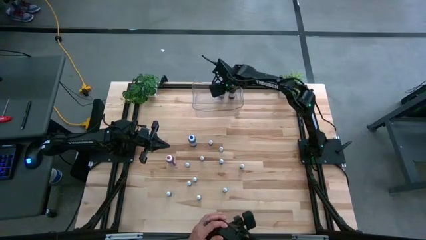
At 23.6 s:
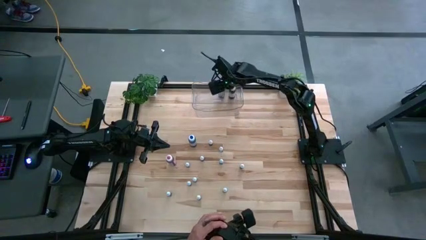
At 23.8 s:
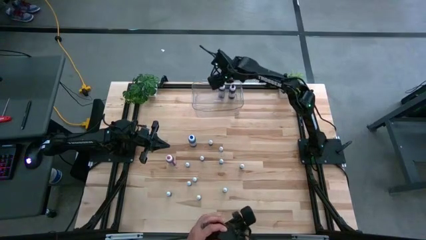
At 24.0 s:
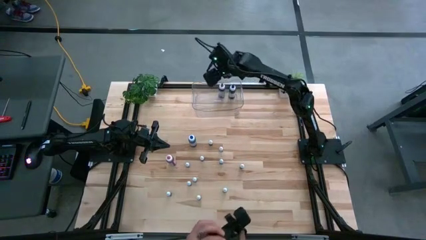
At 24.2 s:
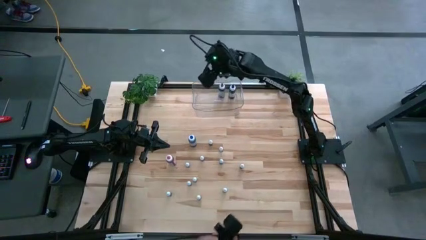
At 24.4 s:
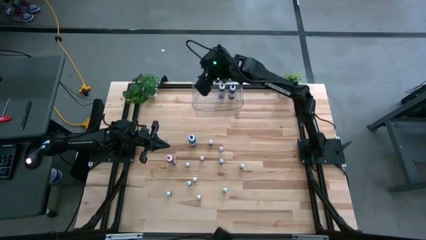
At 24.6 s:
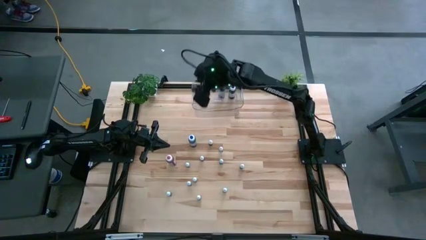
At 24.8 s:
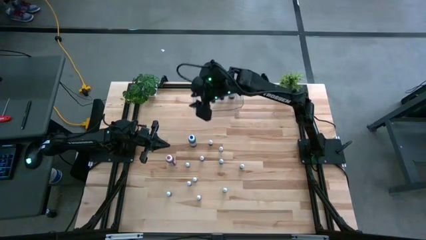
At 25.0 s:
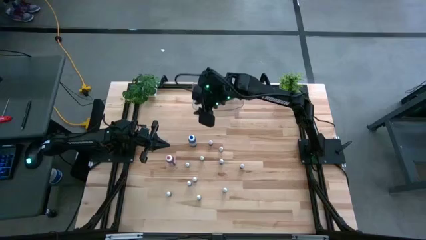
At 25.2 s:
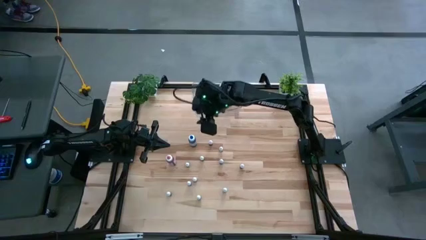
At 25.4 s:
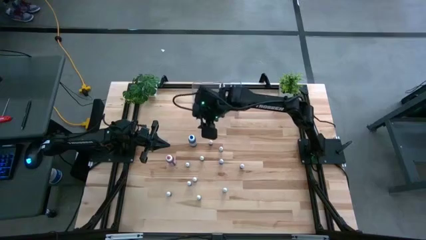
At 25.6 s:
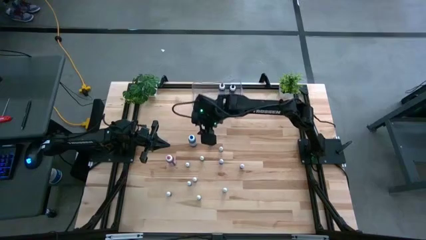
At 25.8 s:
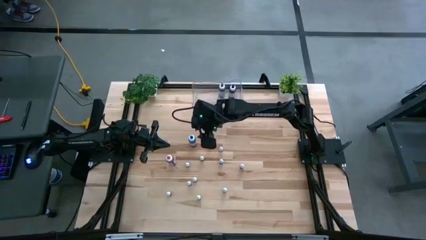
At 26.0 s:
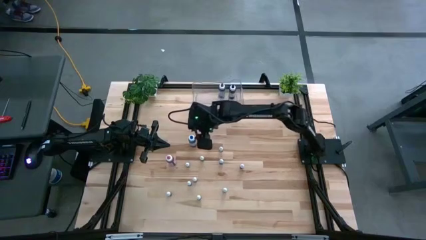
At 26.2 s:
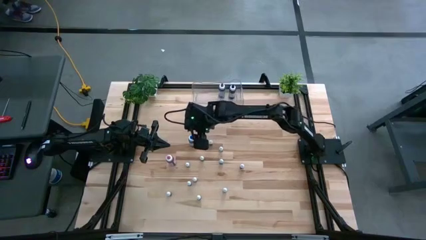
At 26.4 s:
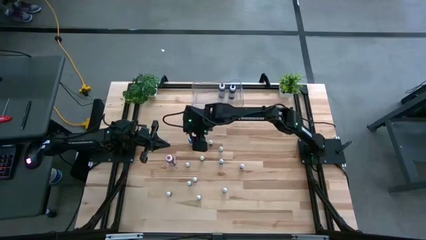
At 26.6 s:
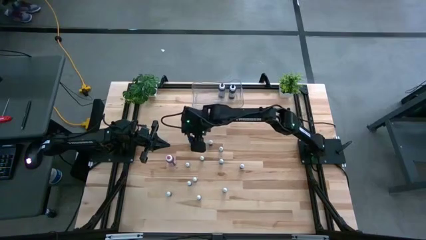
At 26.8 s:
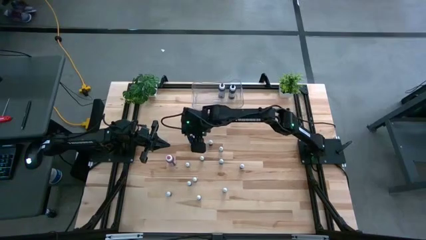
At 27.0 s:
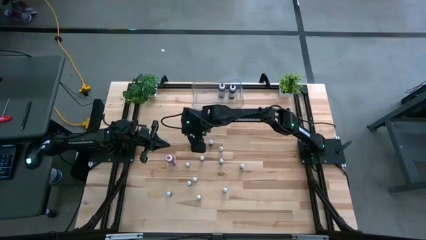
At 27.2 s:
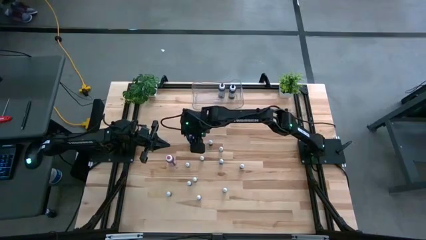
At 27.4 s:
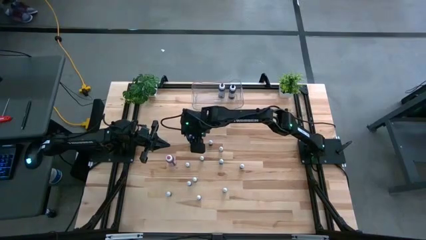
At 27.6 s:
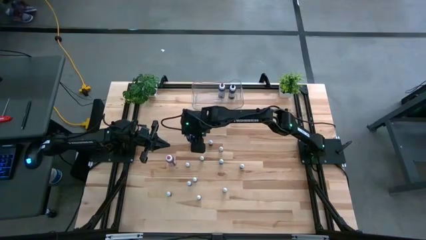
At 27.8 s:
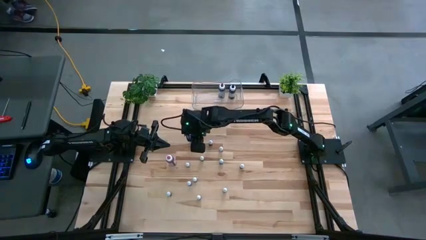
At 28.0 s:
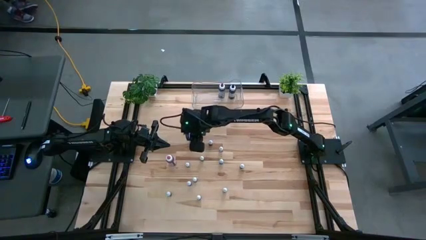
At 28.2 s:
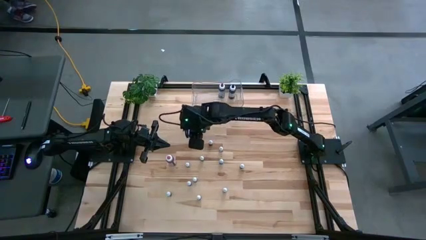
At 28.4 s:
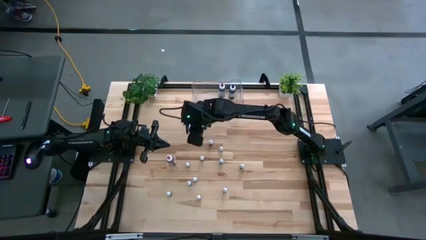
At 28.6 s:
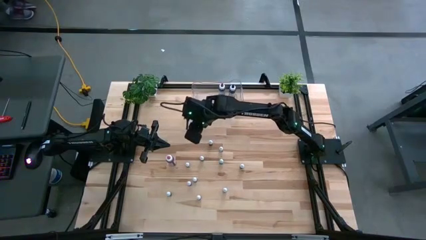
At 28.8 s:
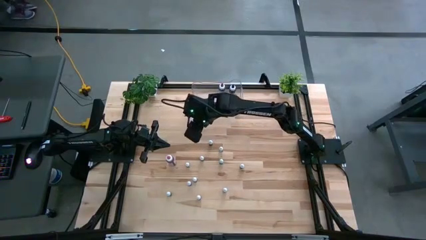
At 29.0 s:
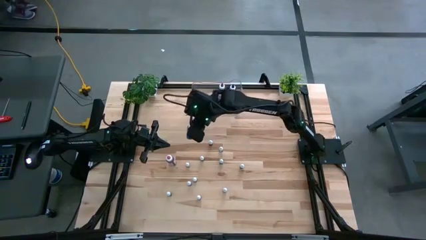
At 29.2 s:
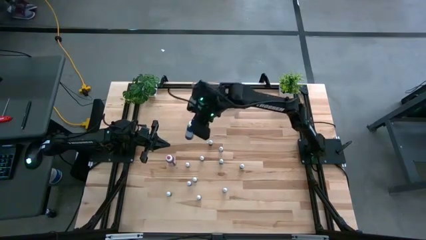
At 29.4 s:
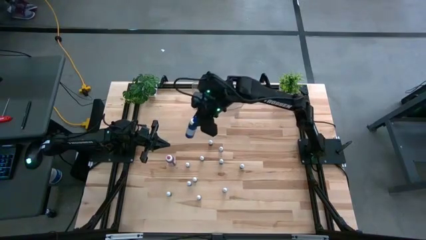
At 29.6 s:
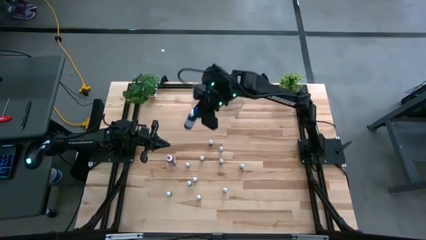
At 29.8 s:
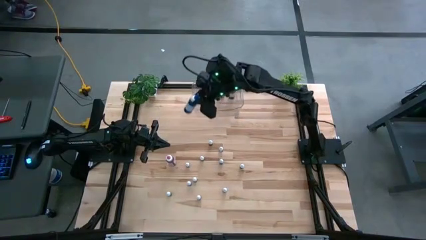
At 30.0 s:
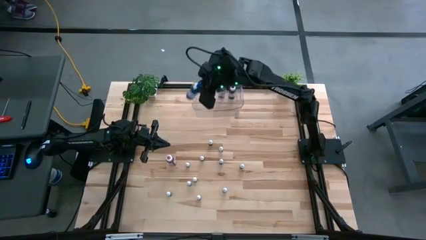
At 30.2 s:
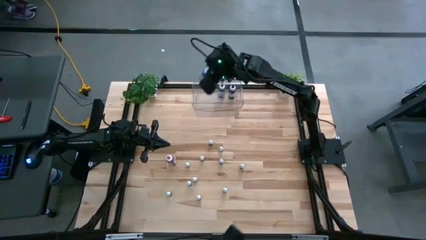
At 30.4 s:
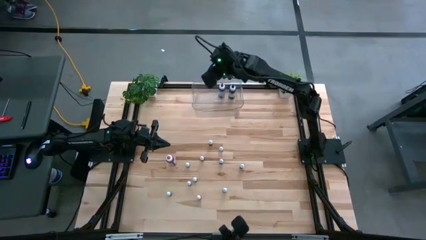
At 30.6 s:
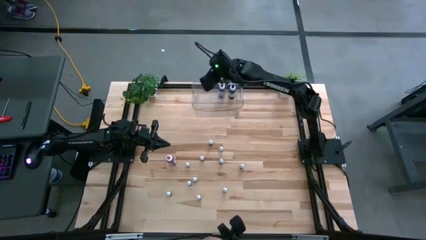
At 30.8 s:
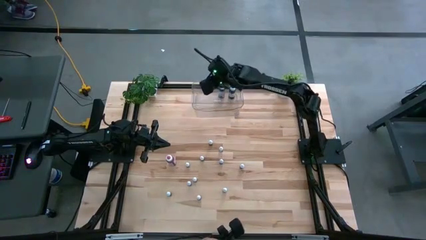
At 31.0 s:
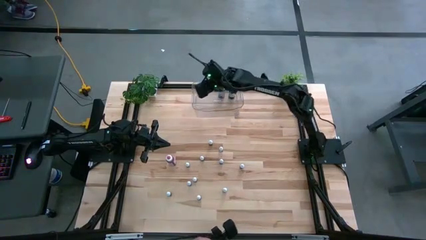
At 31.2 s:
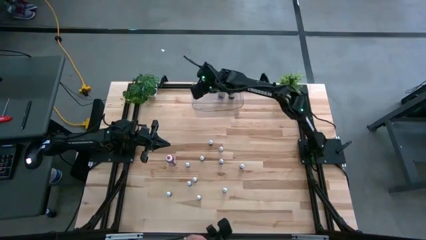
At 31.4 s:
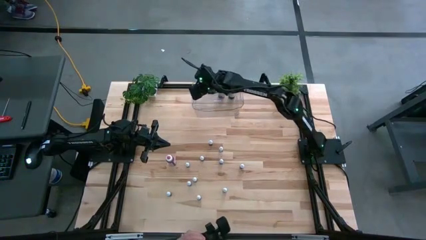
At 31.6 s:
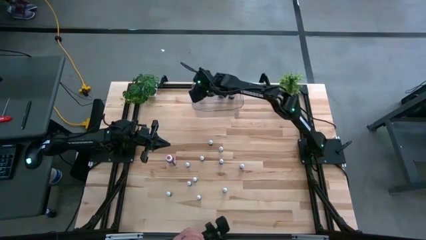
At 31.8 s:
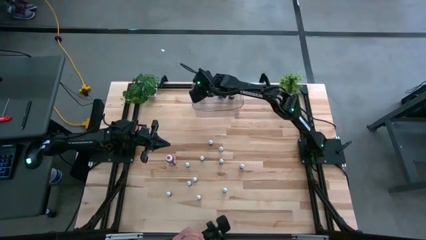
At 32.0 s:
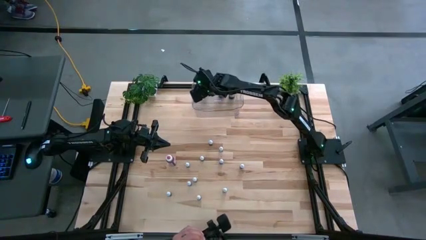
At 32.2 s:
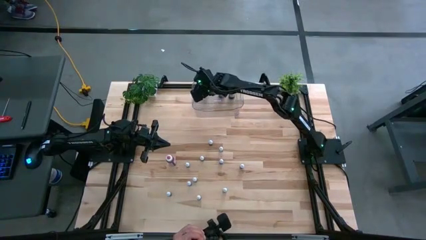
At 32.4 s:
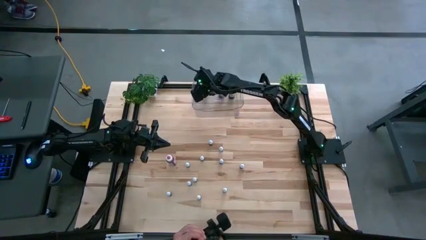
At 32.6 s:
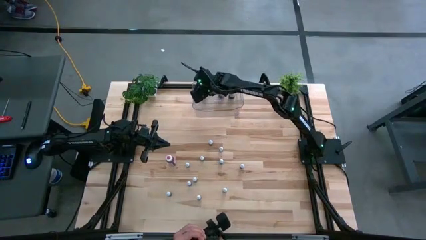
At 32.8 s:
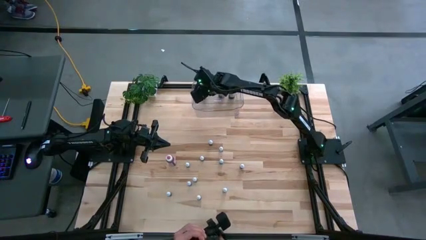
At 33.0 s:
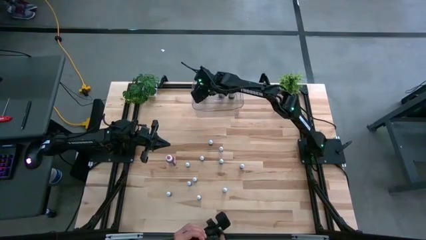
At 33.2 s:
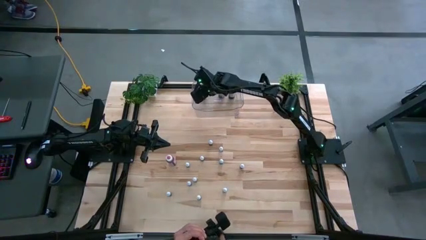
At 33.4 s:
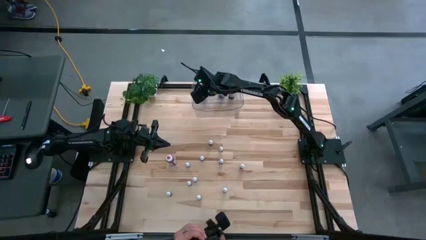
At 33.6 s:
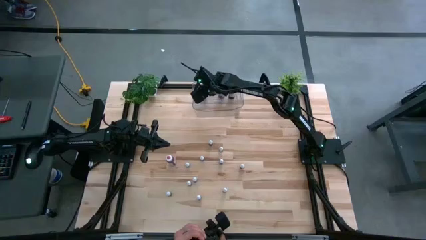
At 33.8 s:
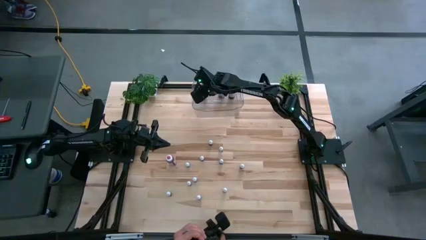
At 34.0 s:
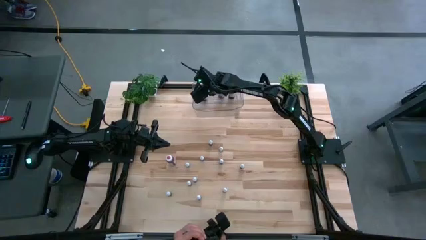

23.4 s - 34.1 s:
Task: Pick & Place food coloring
Put the large blue food coloring bottle into the transparent bin
